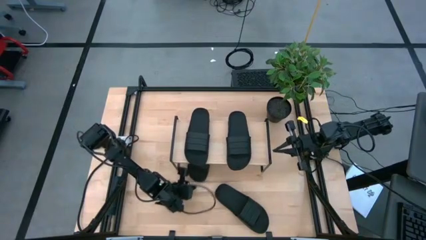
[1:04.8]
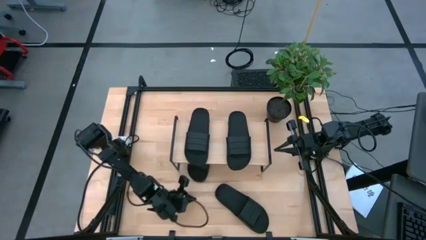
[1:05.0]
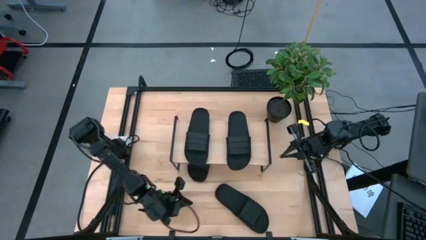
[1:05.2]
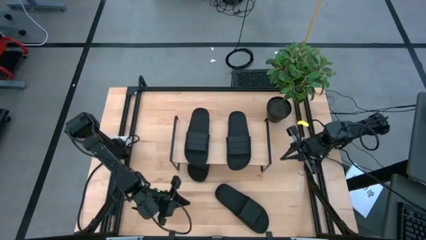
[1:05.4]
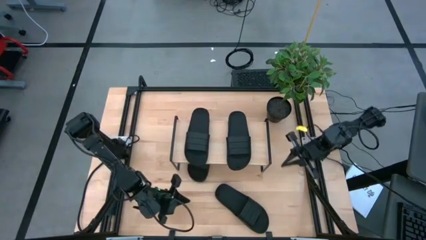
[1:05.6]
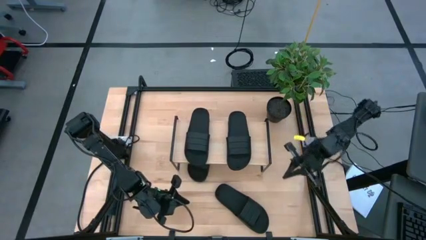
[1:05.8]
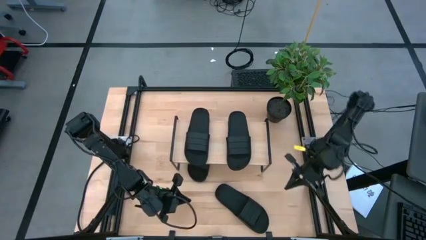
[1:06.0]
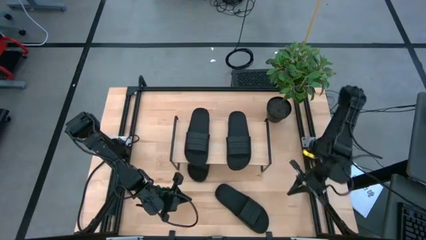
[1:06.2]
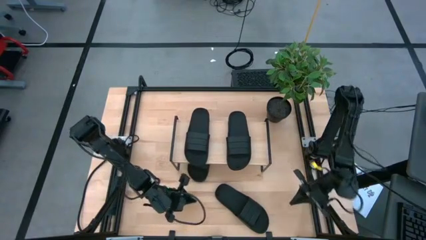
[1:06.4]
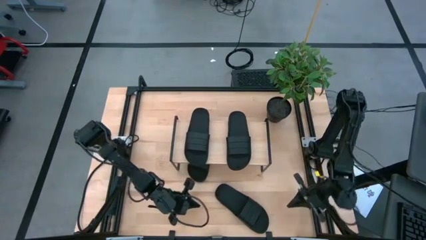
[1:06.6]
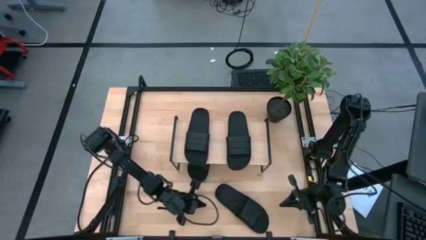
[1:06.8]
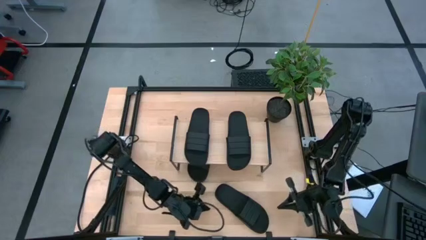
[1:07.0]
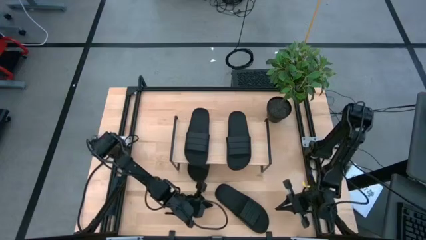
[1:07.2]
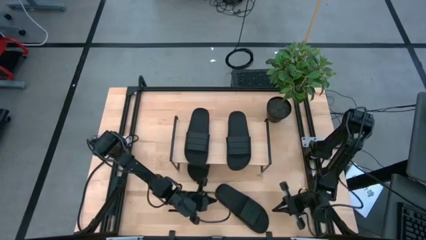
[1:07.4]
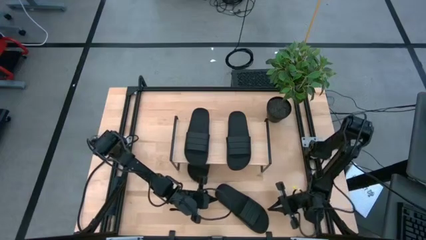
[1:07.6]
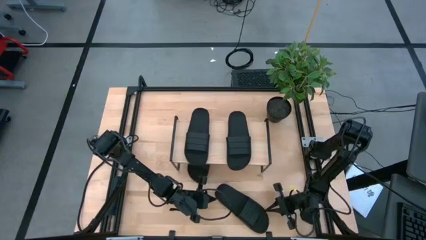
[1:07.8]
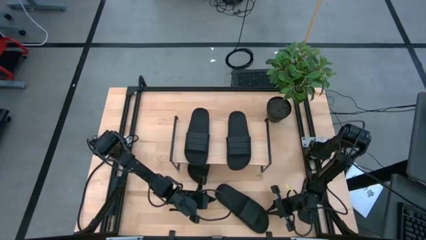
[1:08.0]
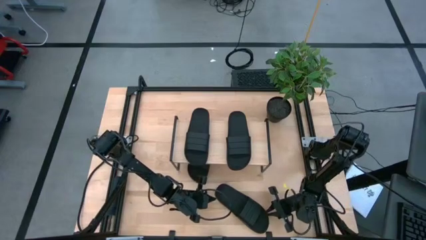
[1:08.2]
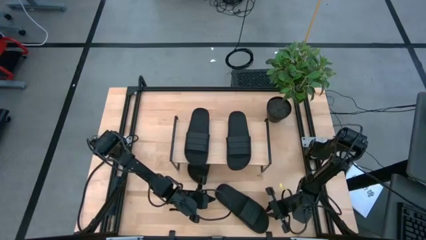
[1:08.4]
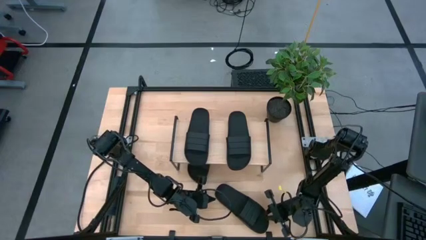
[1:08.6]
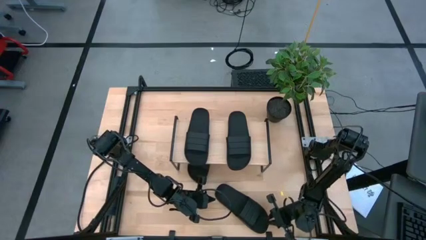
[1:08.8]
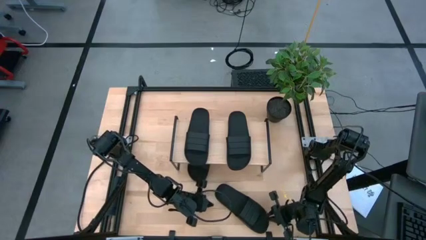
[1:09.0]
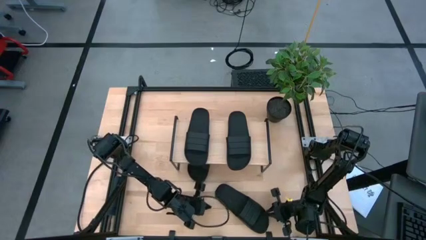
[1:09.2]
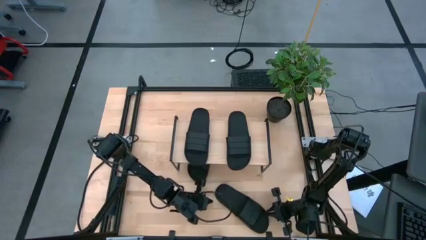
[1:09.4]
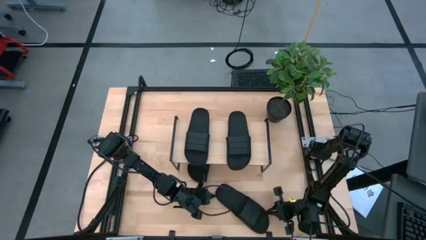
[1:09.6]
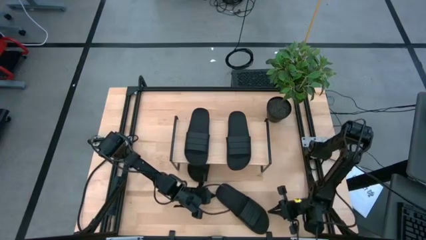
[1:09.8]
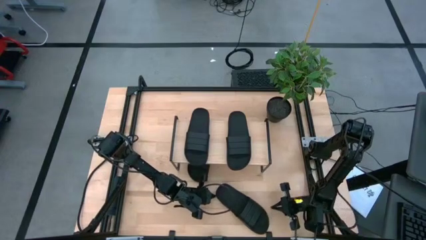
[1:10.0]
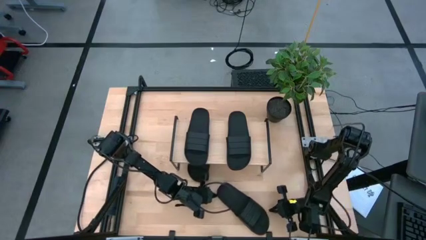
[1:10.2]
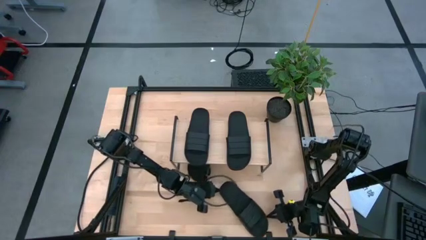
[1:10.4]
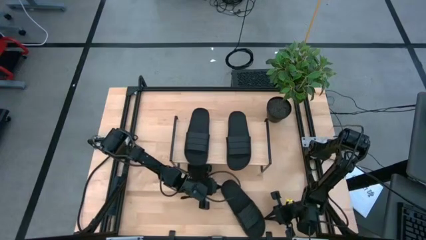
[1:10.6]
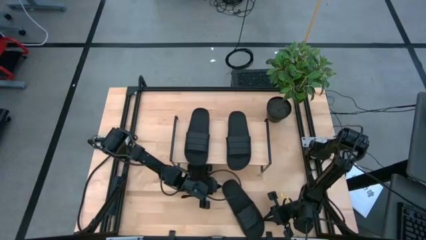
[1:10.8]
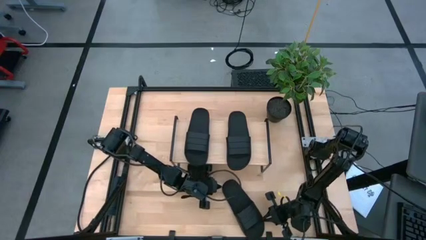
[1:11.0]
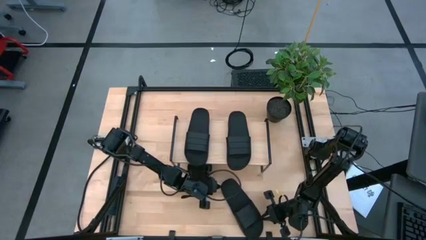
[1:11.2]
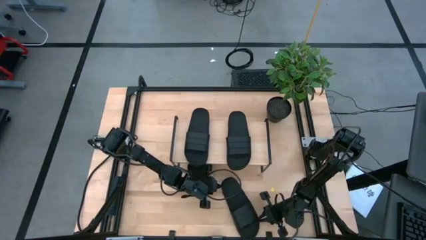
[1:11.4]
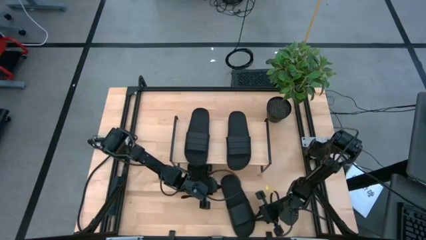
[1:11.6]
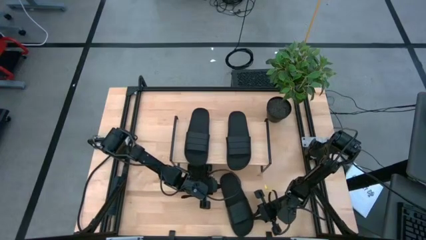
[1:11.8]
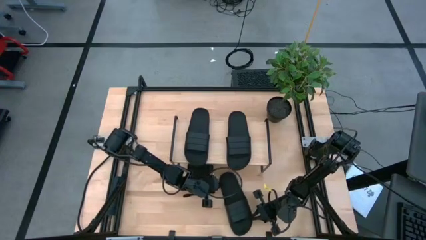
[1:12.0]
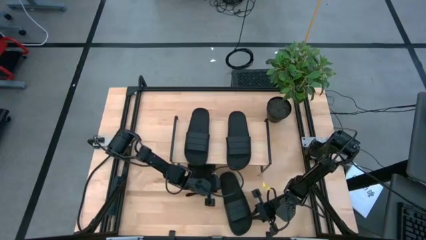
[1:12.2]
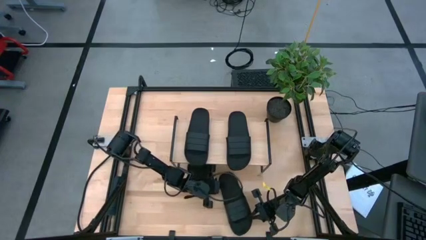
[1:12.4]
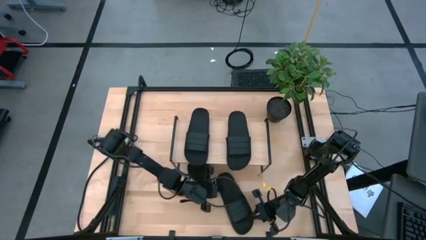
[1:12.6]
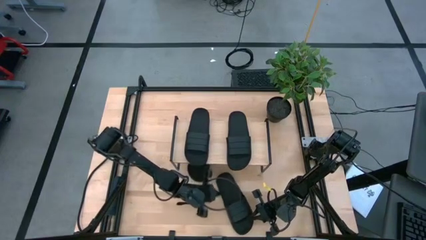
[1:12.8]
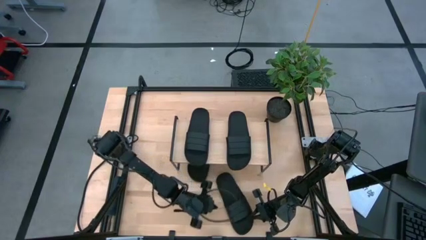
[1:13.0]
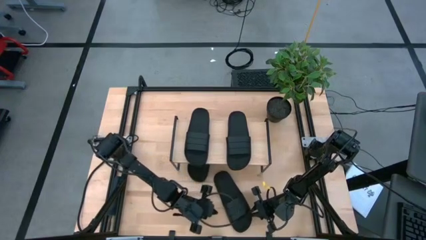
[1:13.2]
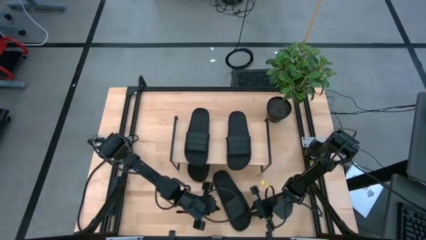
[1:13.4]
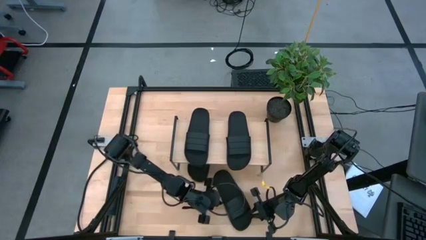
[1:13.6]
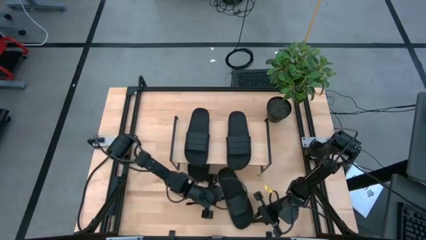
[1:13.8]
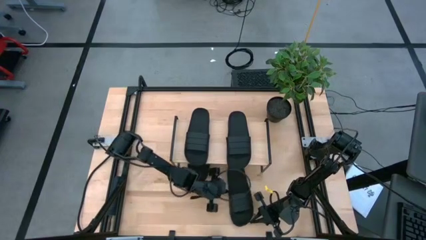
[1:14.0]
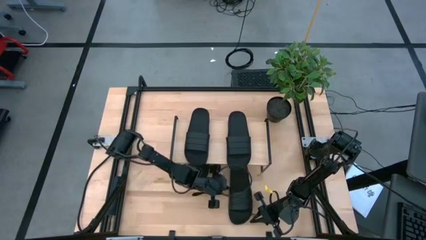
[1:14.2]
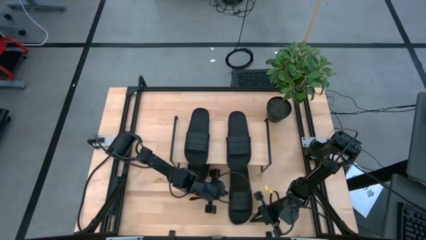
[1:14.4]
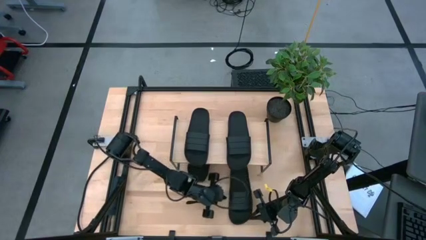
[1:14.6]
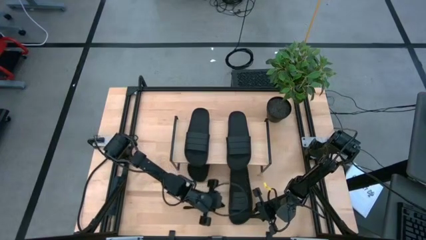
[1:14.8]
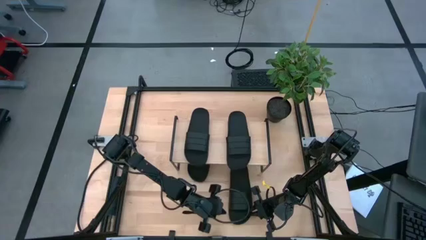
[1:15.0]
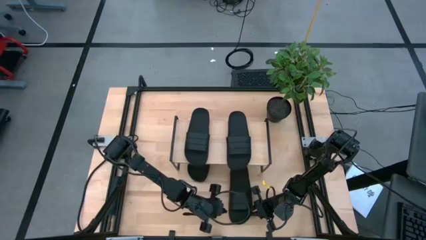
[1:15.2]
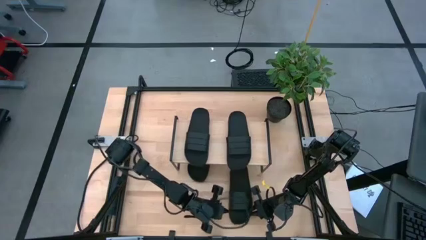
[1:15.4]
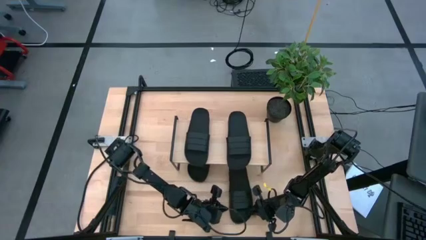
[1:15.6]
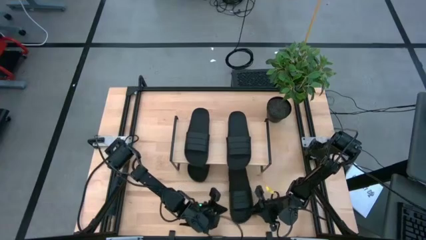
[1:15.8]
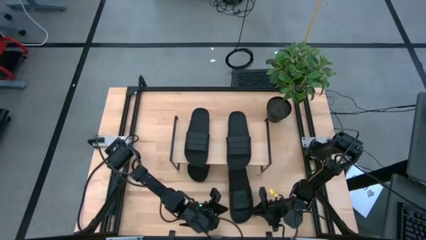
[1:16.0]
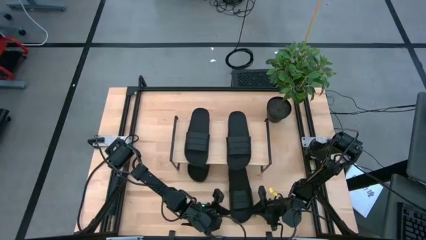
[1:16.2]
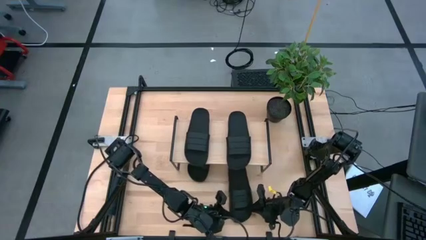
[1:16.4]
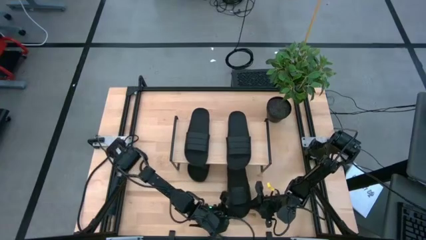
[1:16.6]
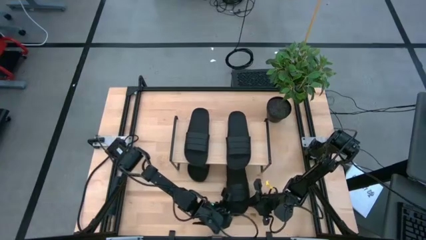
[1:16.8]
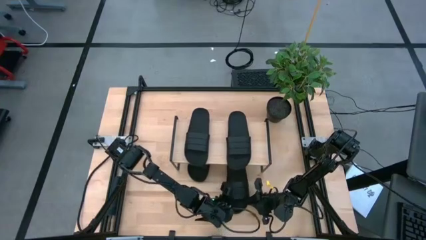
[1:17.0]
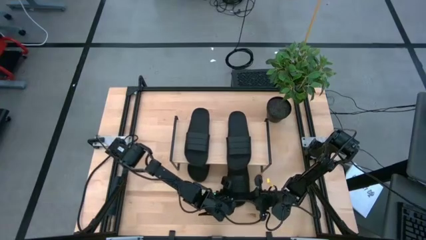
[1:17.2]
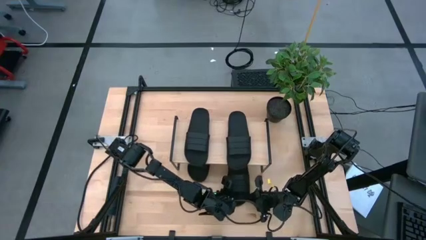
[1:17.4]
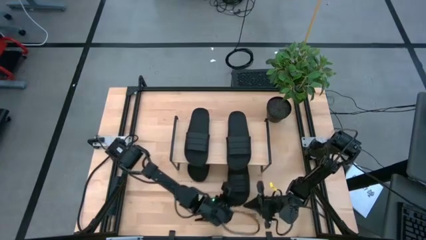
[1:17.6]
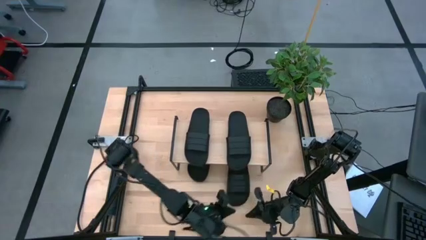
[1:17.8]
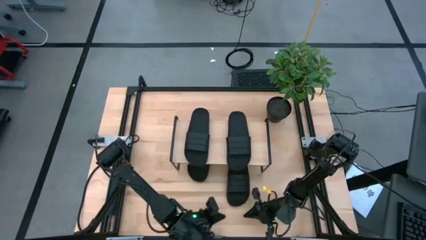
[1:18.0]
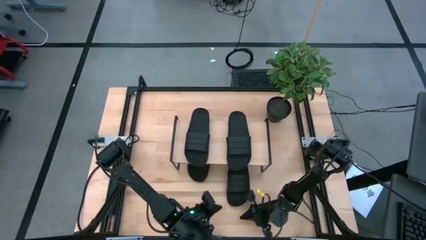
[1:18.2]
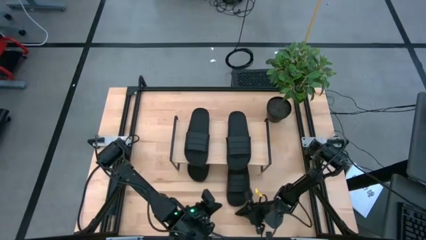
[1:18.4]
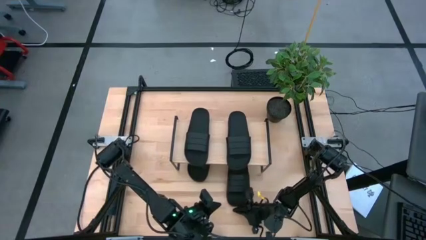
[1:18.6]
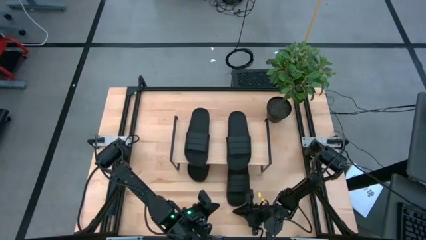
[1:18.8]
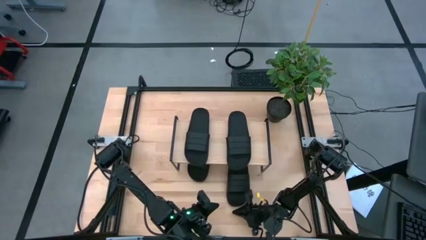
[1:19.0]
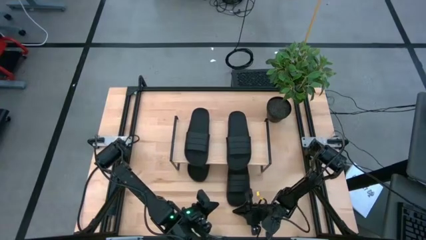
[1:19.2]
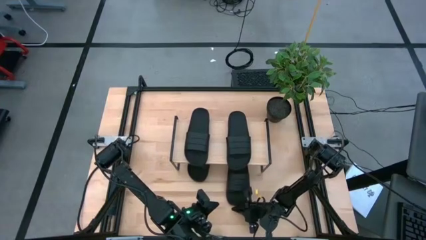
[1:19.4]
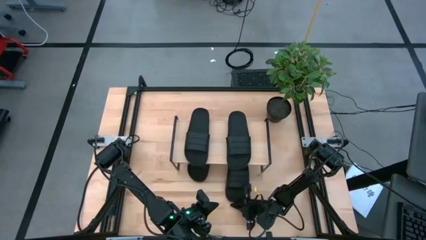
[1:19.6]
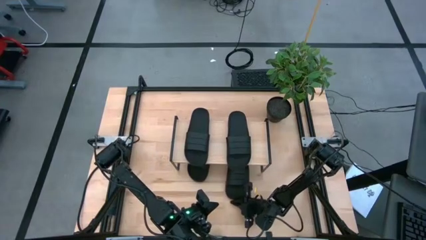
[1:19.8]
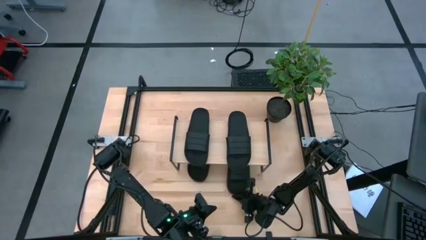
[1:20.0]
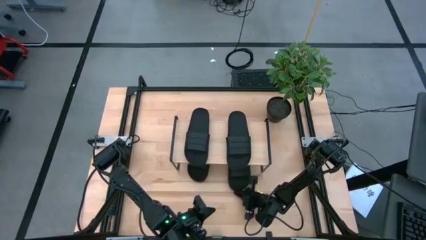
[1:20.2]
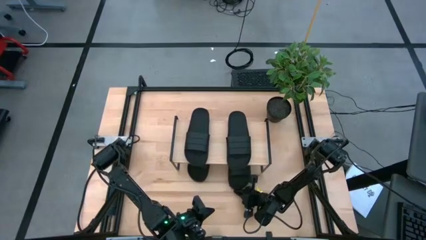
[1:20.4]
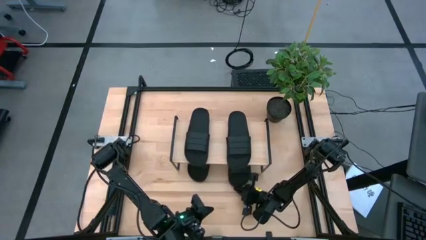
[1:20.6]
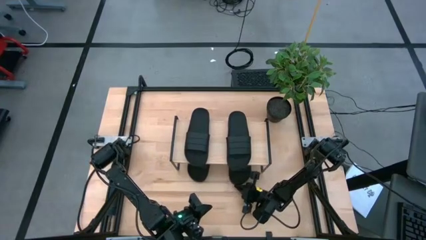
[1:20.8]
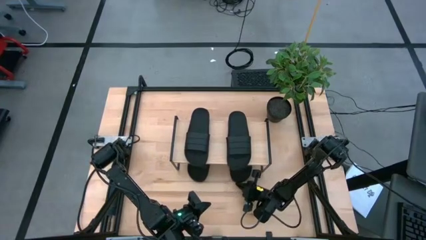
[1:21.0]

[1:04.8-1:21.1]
Task: Pick and place slides into the shelf
Move the black slipper under the shelf
